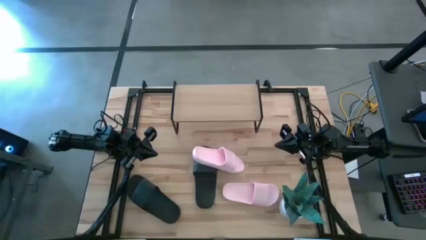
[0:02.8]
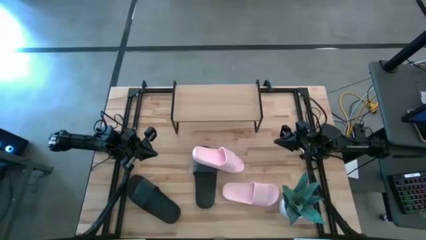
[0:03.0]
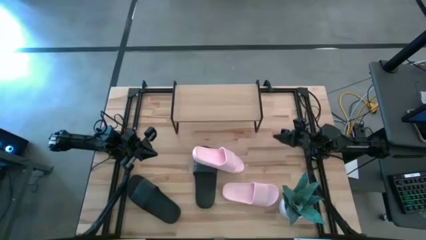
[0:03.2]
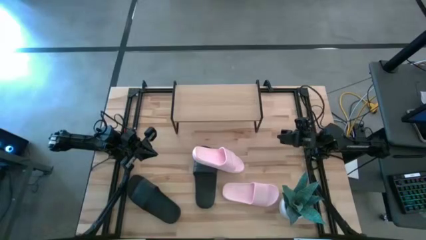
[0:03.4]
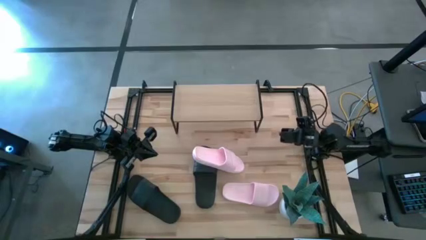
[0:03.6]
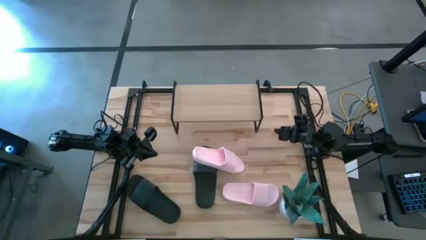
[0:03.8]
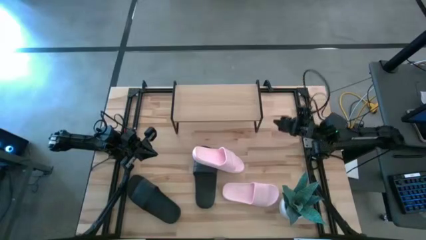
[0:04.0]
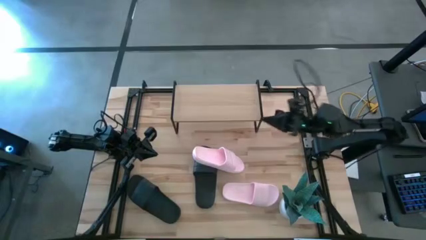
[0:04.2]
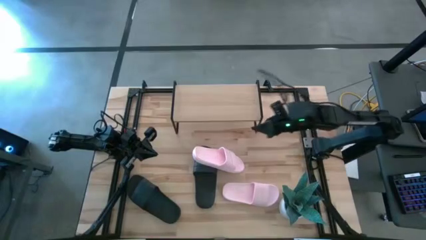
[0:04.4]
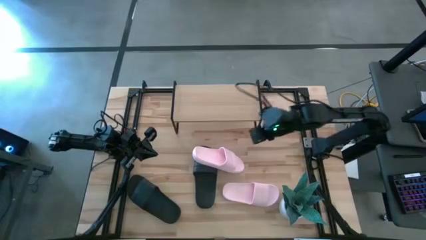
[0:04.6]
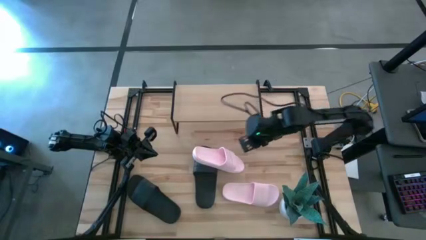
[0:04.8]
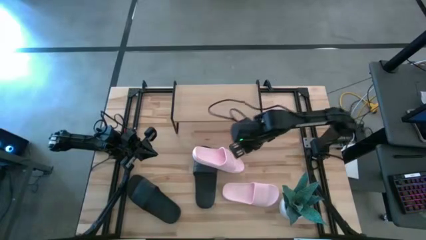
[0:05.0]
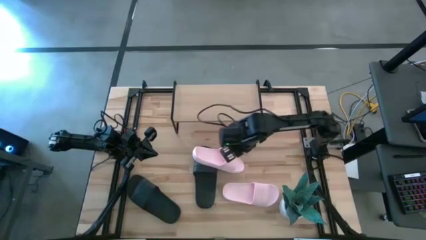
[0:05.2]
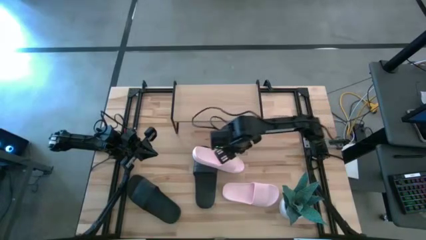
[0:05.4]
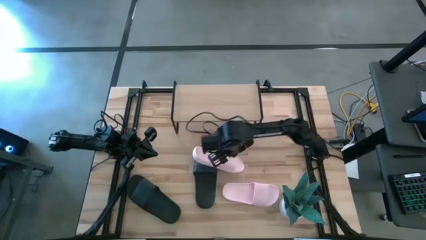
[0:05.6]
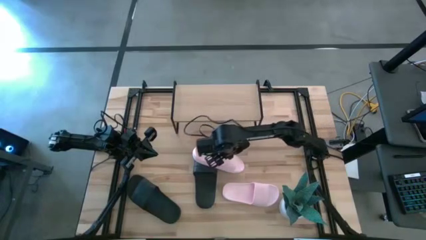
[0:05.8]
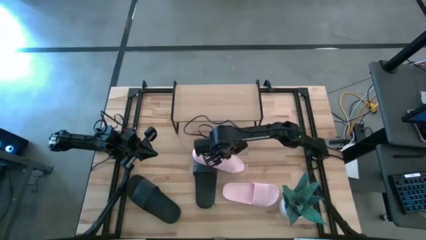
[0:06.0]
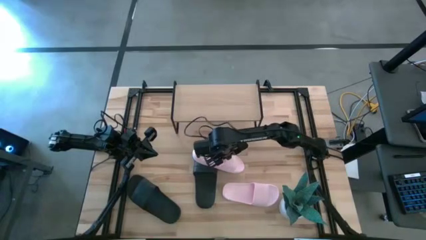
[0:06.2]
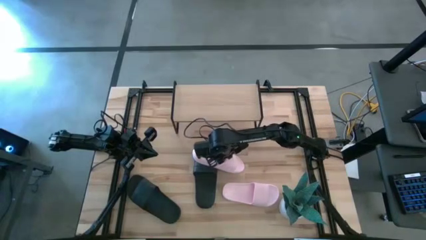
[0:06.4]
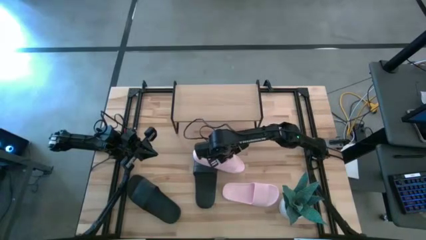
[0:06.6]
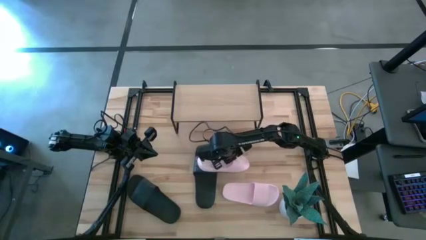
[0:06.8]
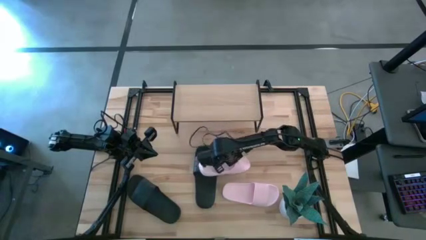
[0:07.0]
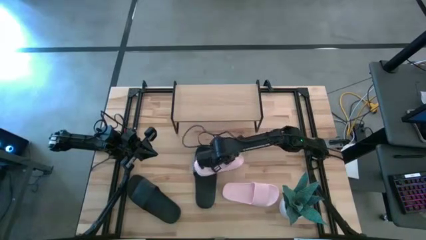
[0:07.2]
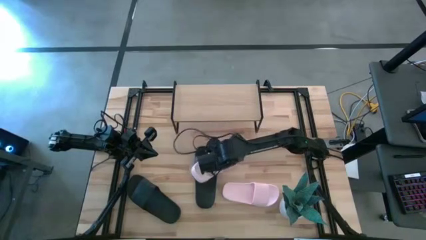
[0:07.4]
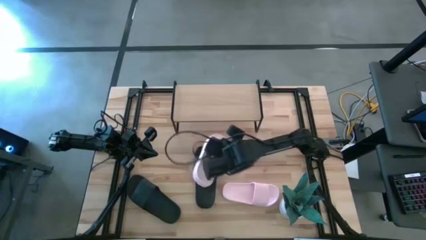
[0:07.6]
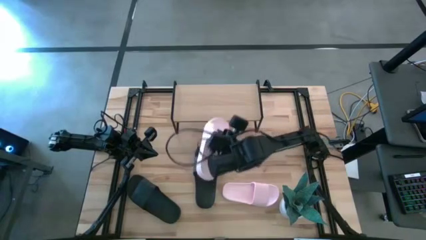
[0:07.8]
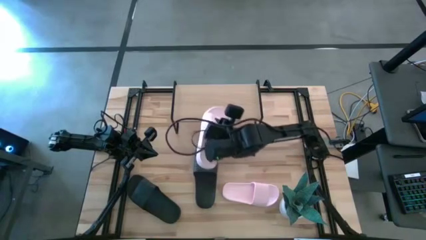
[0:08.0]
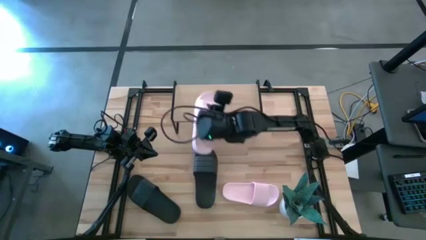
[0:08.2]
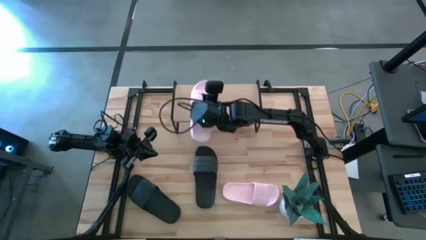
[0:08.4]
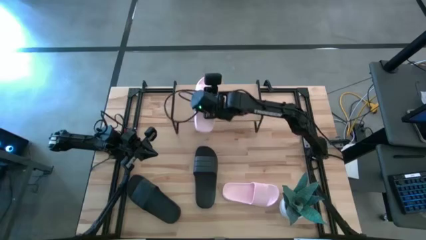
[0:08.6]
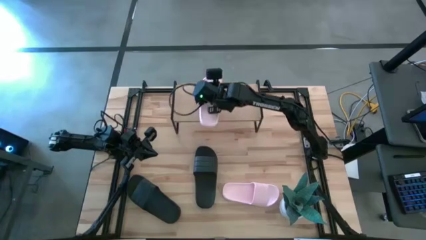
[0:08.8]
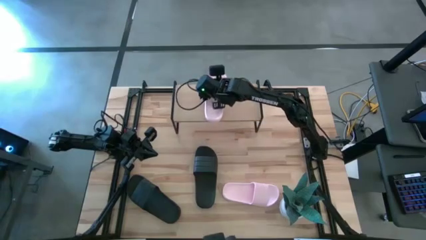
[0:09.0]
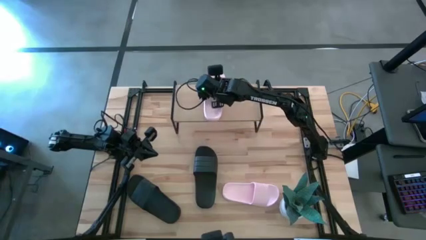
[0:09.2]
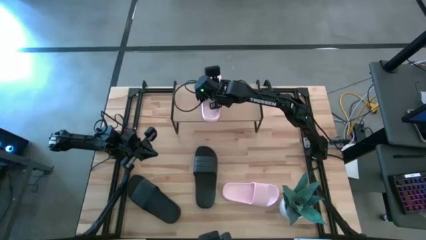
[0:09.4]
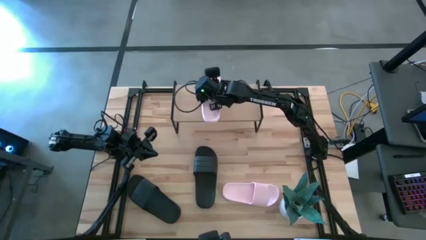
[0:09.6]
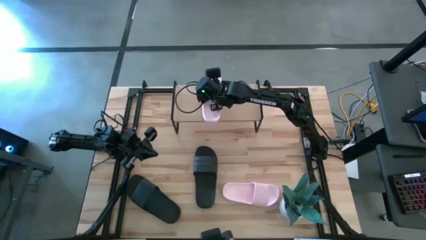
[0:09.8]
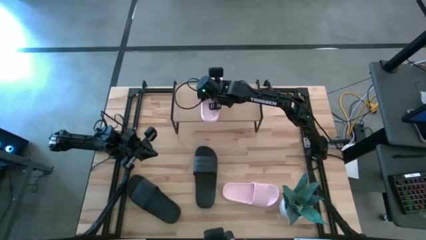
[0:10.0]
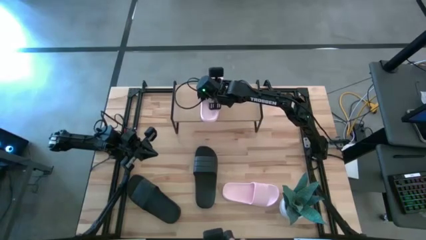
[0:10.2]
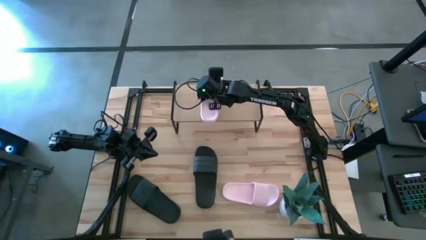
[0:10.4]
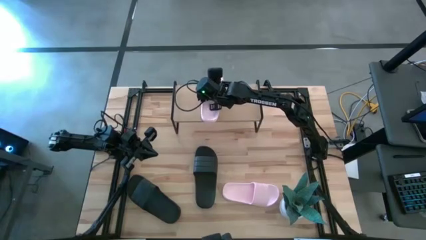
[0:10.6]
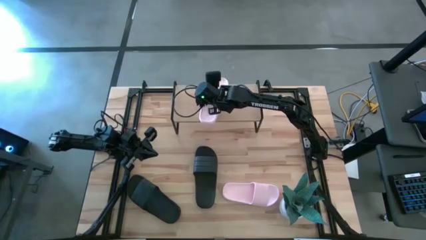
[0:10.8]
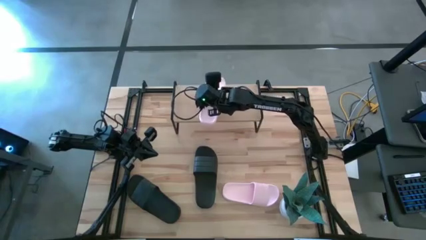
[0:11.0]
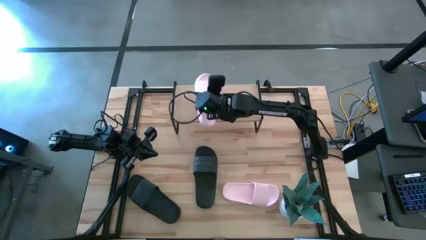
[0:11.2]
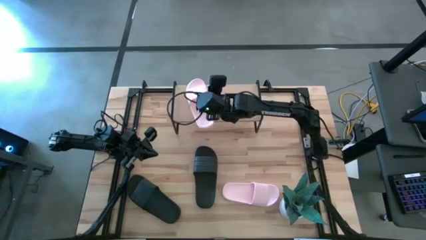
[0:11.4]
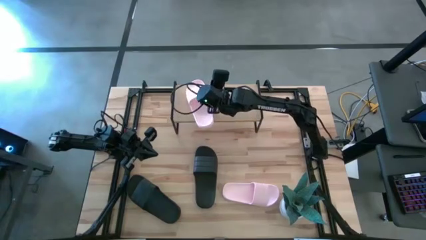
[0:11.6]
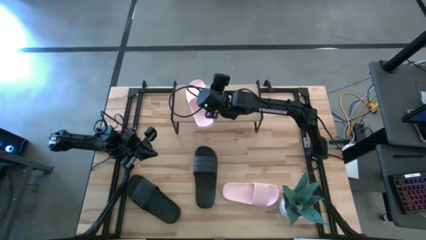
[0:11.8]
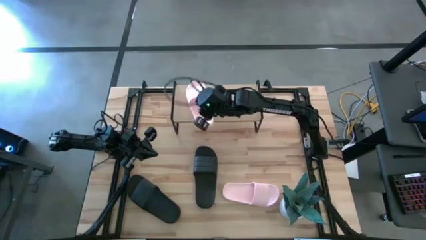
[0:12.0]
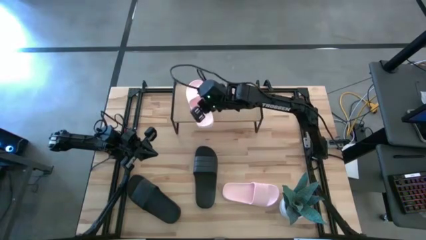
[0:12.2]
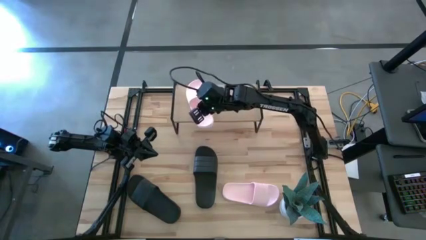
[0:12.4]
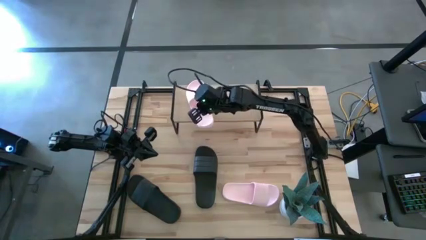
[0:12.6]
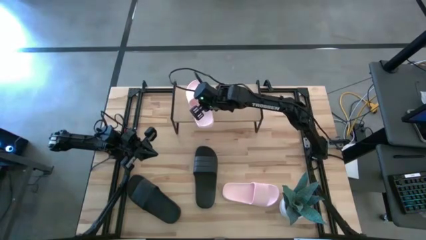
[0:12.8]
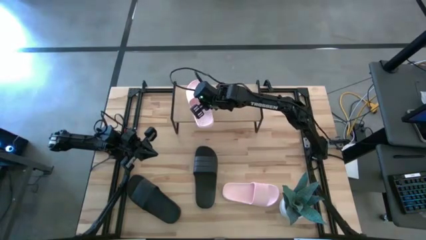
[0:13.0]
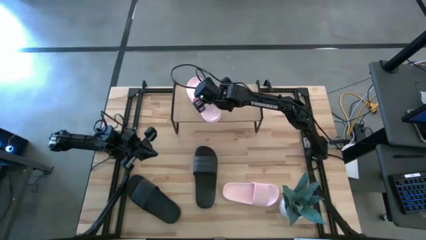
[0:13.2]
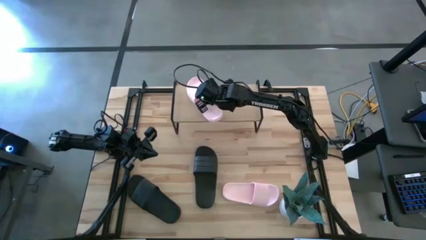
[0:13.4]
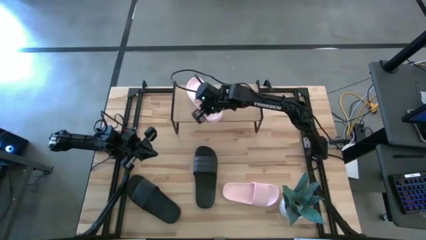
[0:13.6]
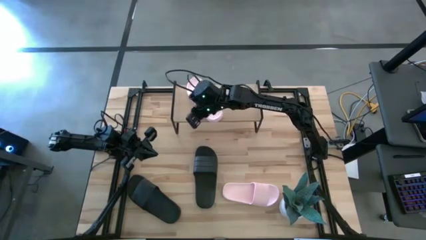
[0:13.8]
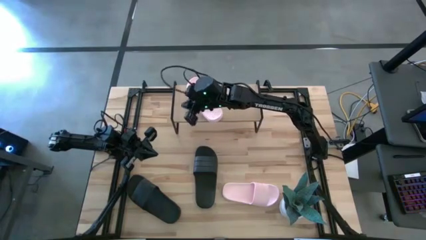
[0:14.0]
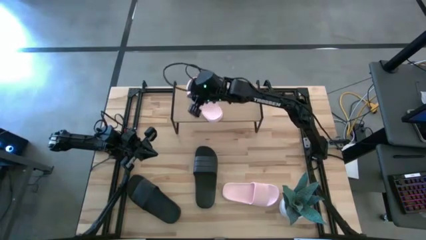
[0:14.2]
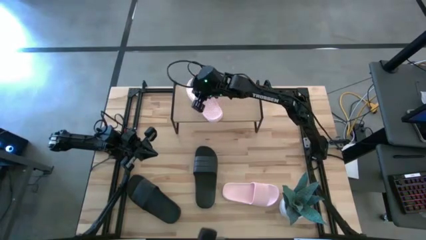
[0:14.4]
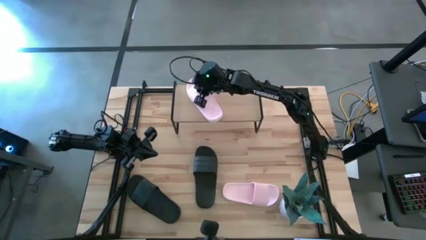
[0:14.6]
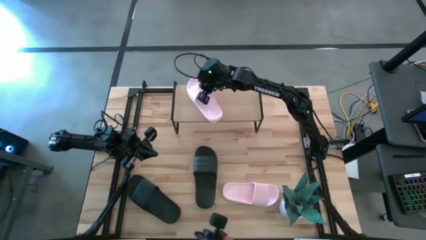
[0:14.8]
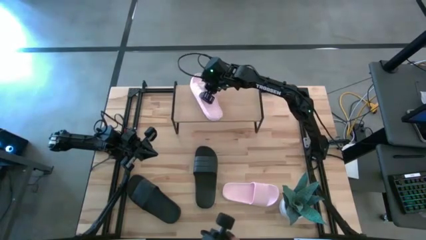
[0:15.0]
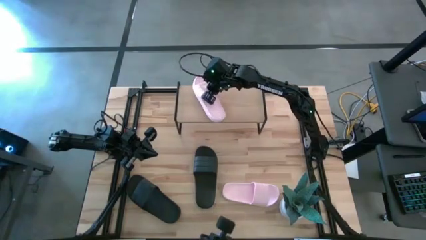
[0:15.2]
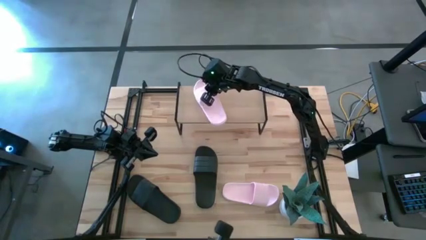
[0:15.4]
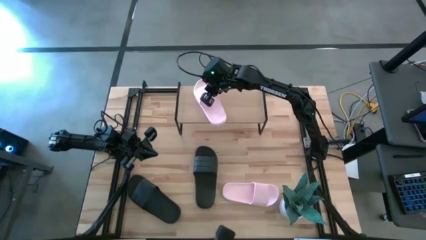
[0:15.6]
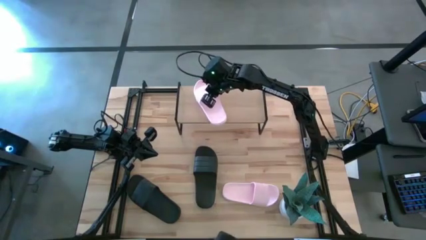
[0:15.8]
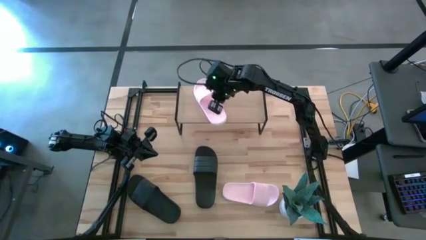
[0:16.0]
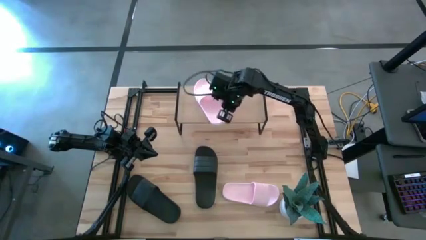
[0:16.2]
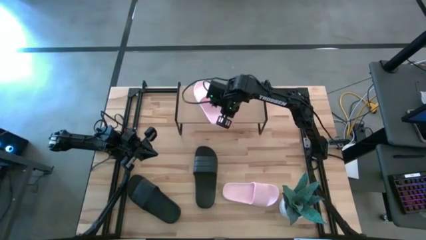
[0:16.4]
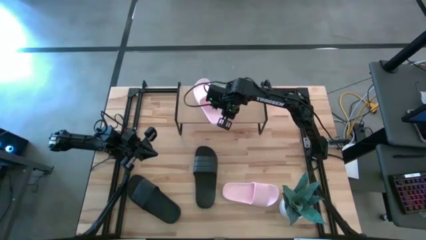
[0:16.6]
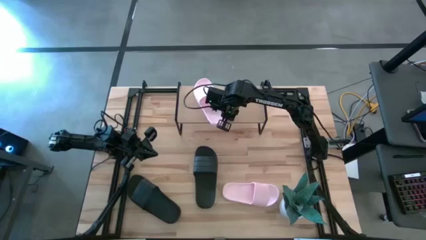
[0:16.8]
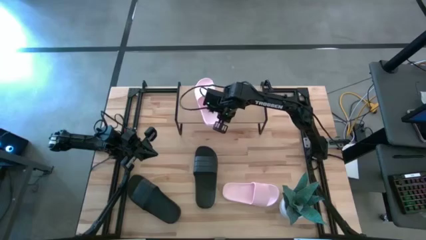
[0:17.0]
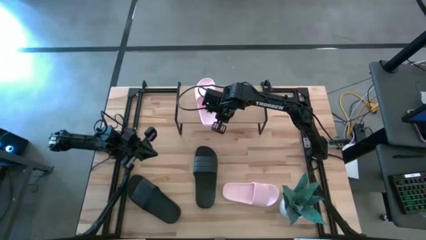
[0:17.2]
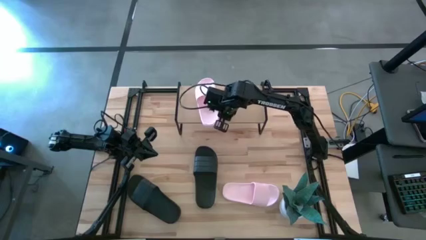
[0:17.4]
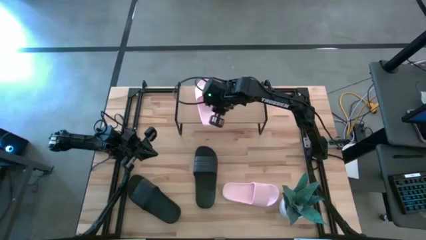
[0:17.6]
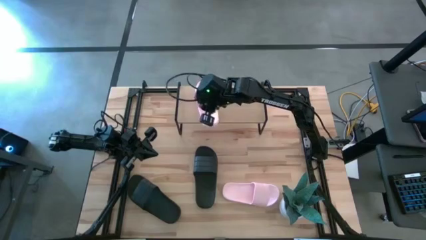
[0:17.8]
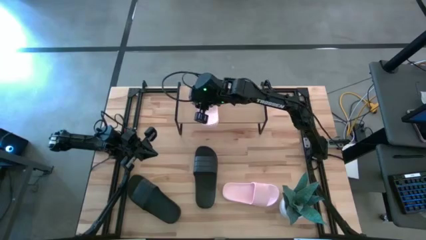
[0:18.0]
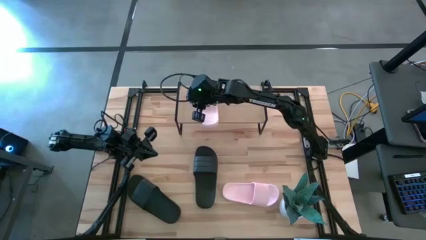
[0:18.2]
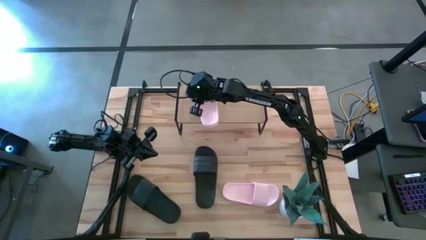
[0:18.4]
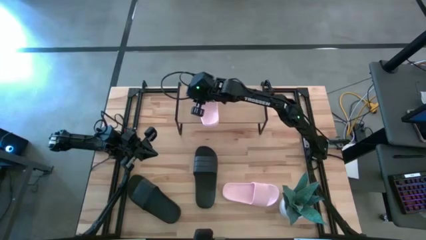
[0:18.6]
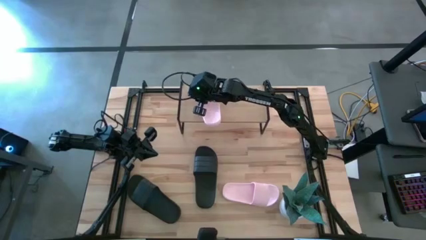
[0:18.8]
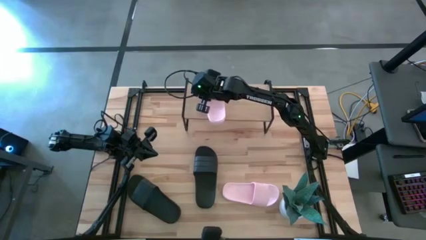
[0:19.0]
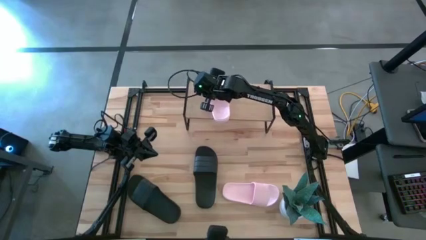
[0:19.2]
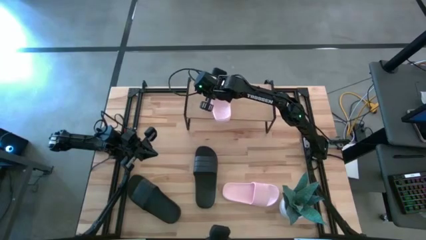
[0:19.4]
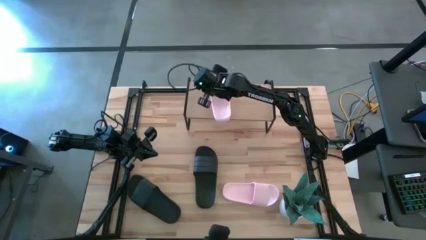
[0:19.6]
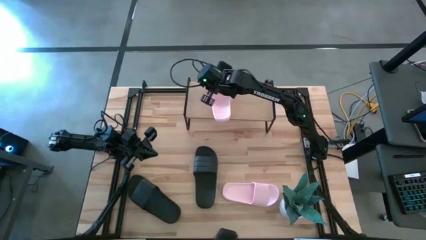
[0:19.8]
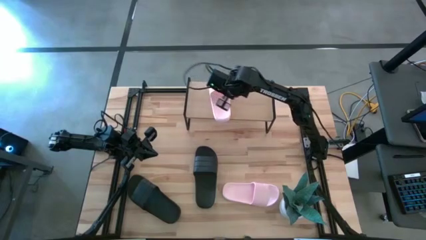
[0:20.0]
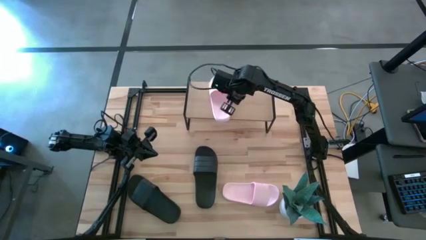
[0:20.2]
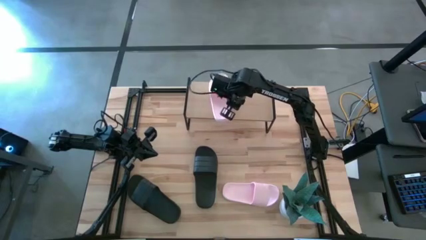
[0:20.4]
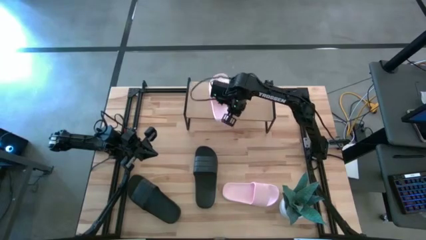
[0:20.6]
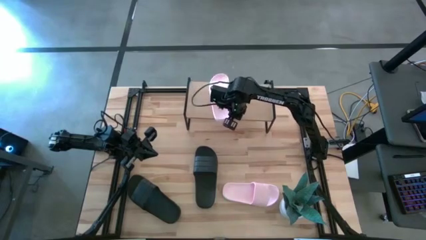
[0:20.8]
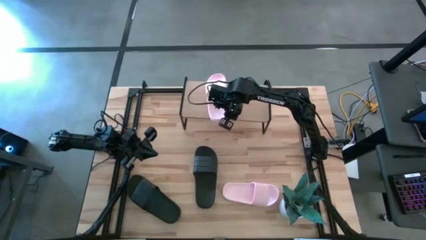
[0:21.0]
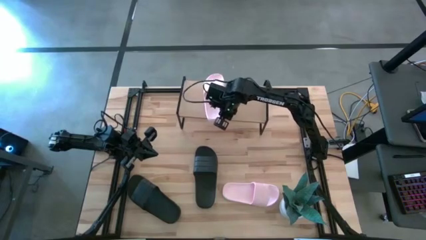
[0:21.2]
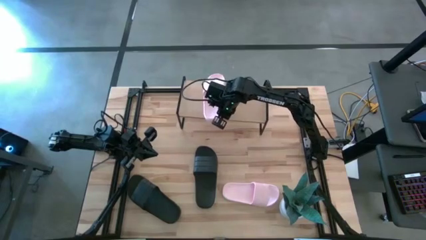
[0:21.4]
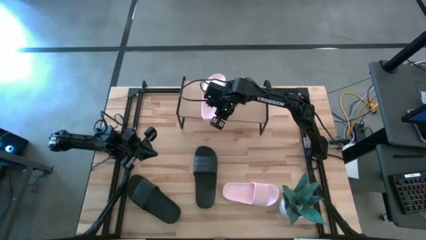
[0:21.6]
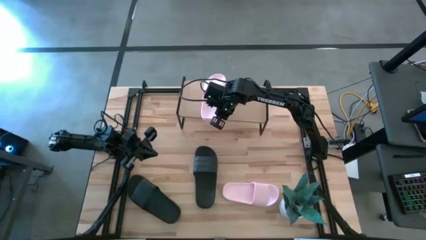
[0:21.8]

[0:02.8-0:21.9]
Task: Pick and place slides into the shelf
Put the top pink slide on the shelf
